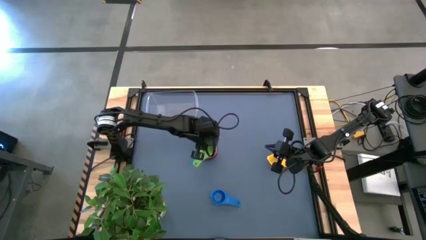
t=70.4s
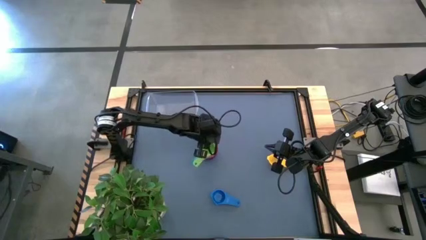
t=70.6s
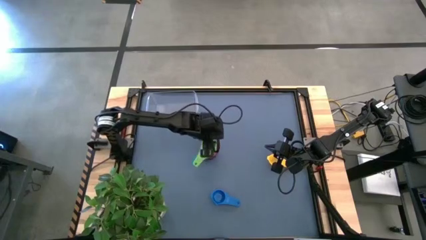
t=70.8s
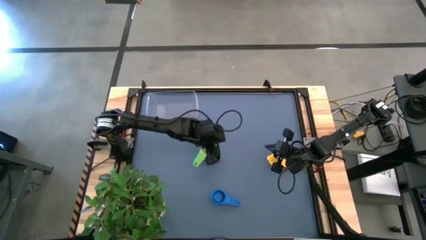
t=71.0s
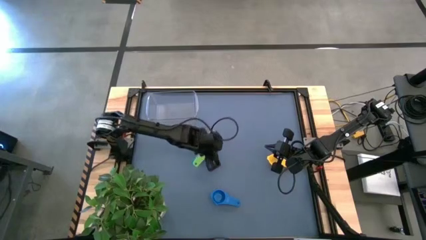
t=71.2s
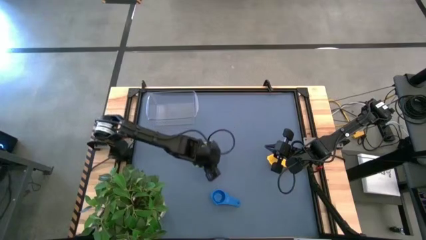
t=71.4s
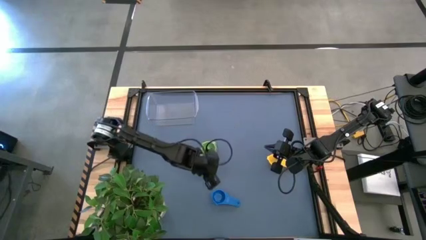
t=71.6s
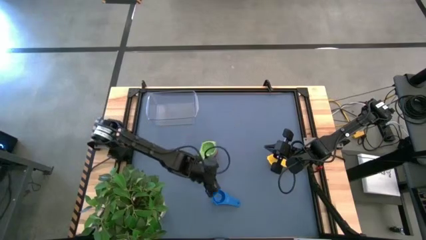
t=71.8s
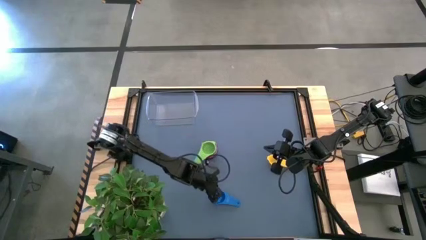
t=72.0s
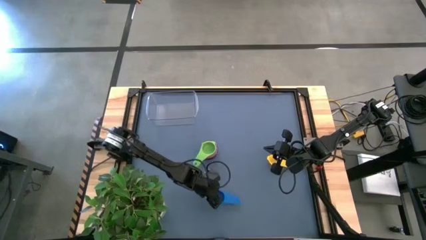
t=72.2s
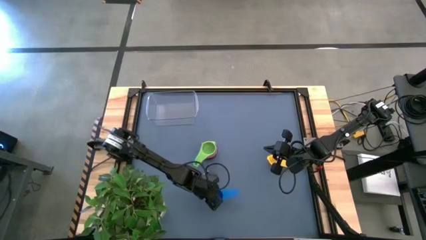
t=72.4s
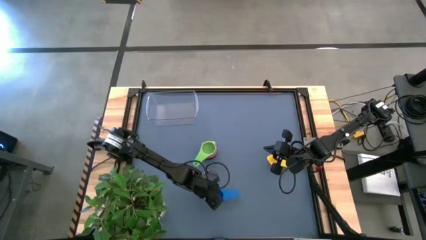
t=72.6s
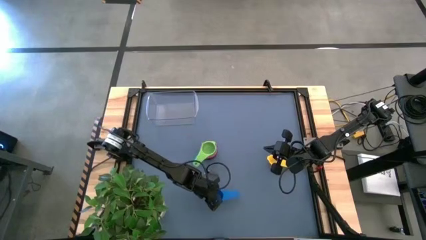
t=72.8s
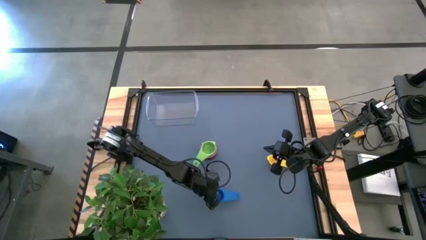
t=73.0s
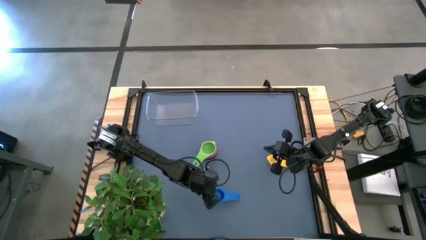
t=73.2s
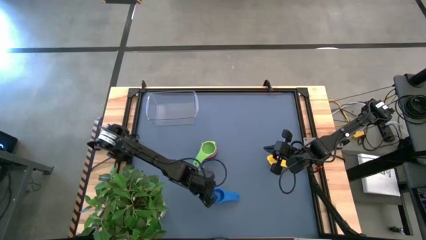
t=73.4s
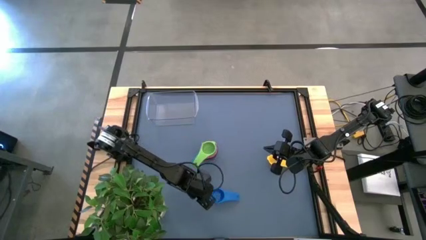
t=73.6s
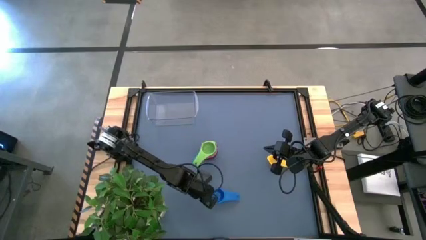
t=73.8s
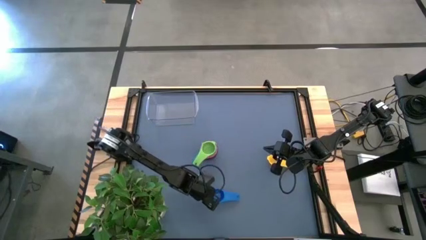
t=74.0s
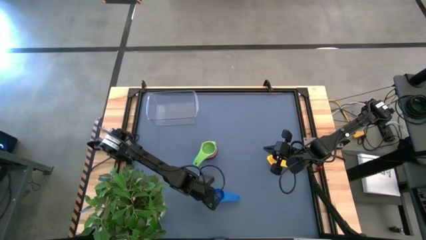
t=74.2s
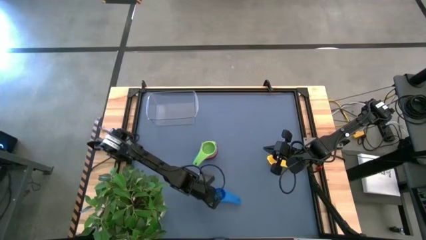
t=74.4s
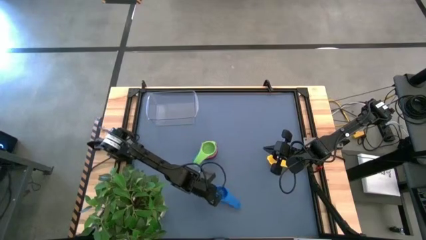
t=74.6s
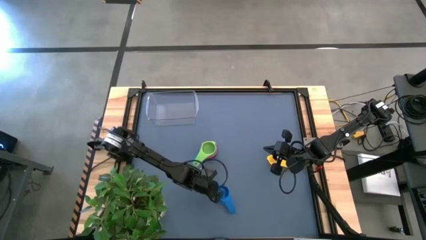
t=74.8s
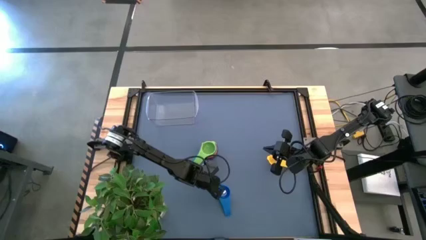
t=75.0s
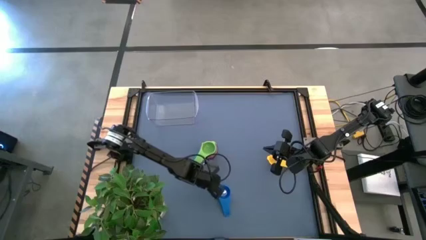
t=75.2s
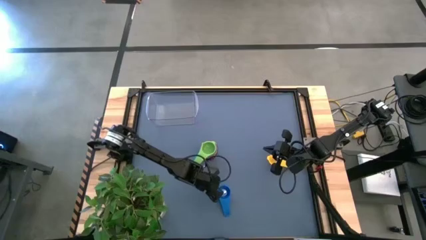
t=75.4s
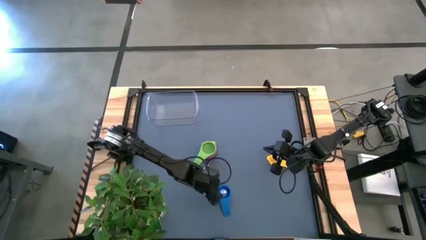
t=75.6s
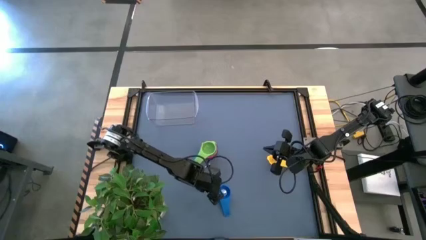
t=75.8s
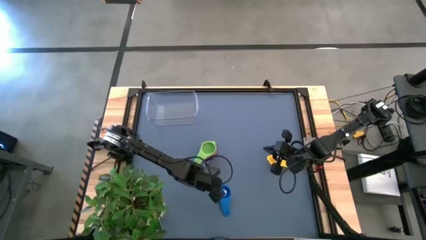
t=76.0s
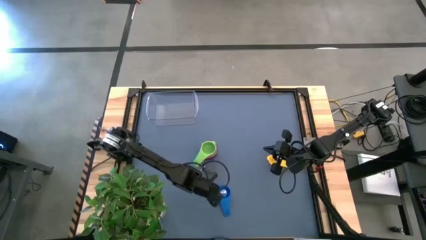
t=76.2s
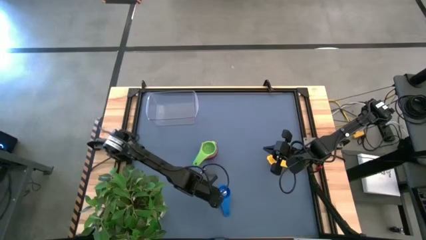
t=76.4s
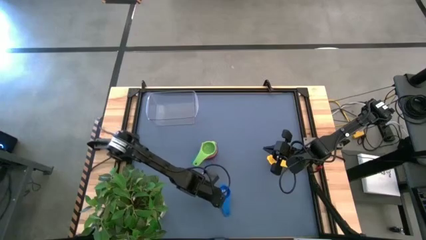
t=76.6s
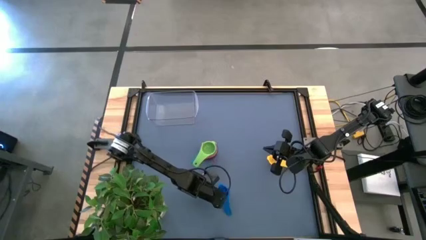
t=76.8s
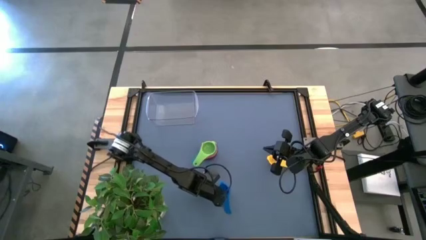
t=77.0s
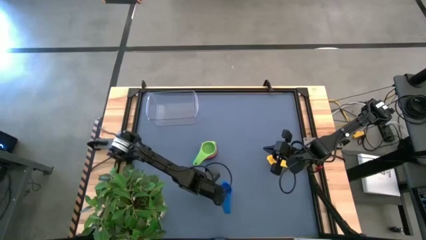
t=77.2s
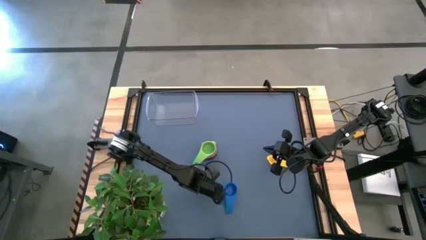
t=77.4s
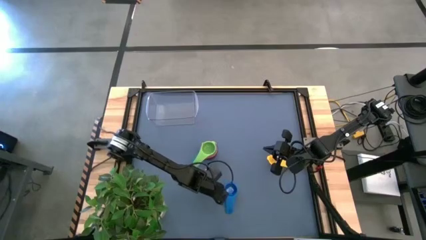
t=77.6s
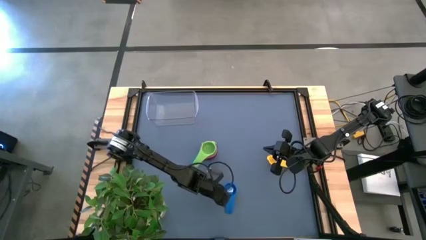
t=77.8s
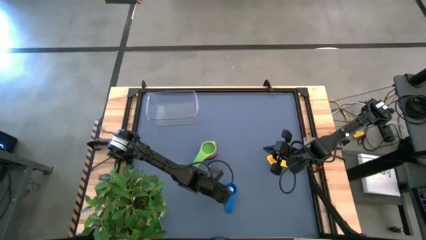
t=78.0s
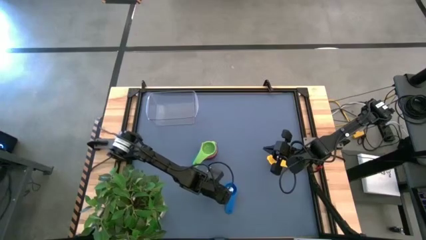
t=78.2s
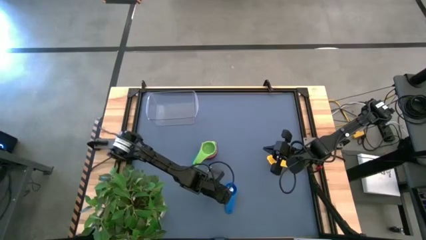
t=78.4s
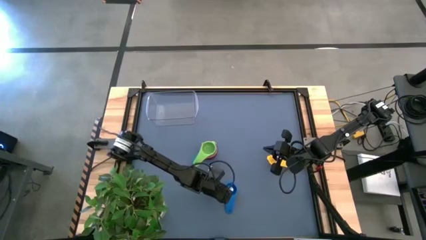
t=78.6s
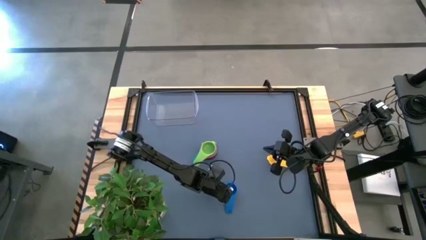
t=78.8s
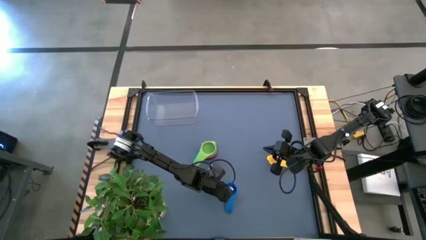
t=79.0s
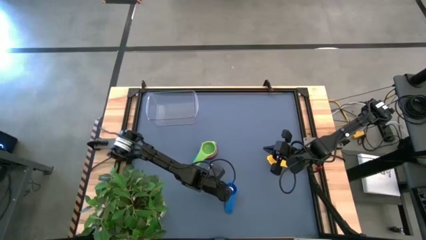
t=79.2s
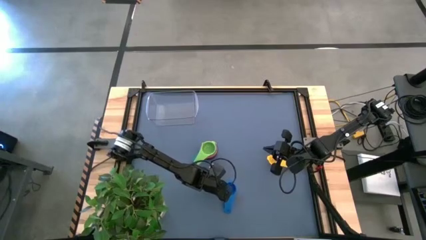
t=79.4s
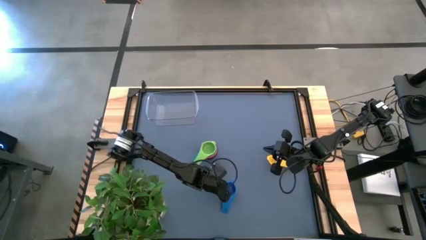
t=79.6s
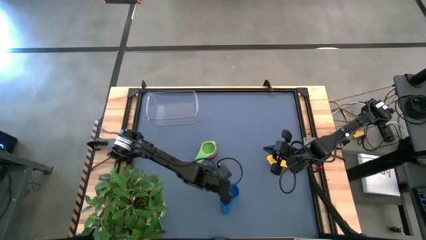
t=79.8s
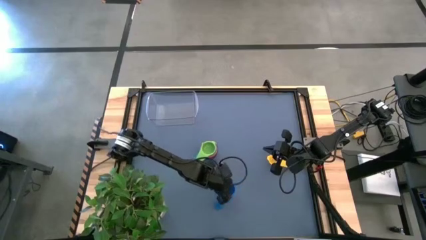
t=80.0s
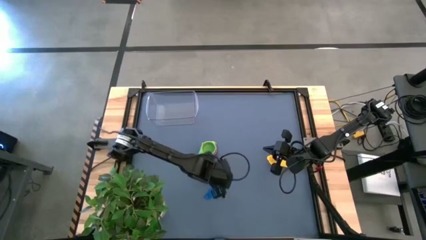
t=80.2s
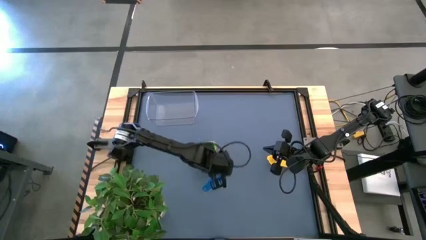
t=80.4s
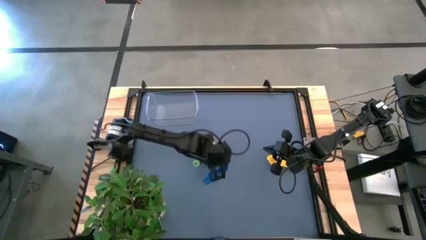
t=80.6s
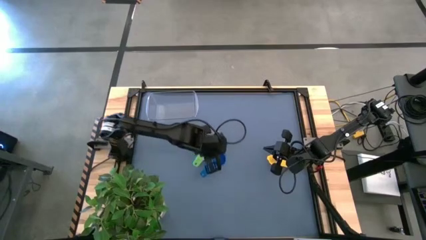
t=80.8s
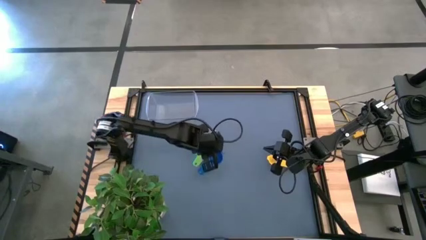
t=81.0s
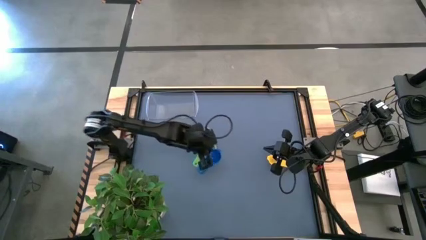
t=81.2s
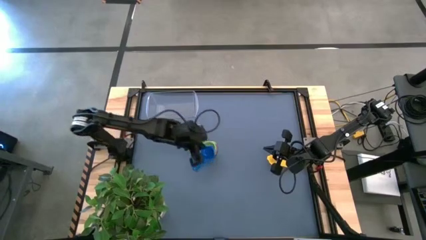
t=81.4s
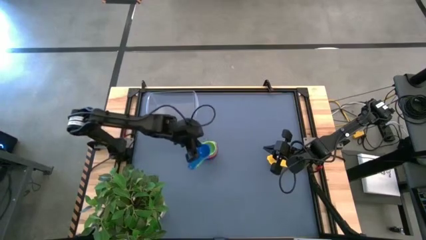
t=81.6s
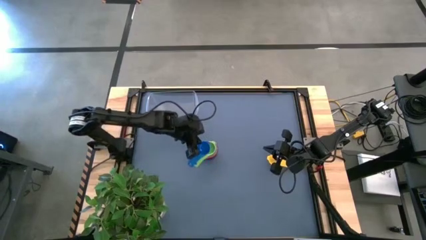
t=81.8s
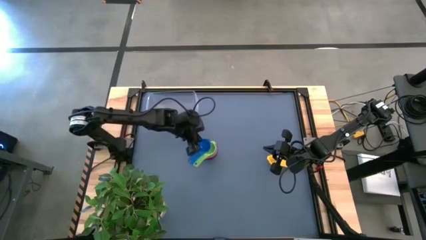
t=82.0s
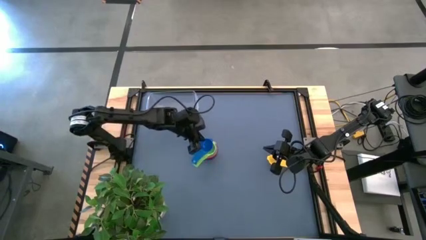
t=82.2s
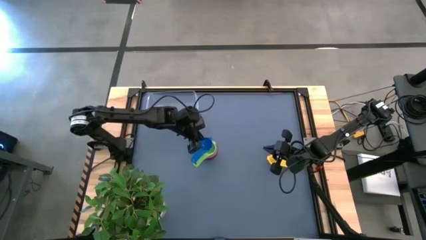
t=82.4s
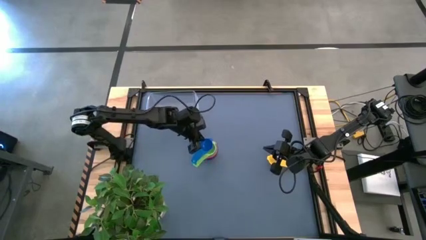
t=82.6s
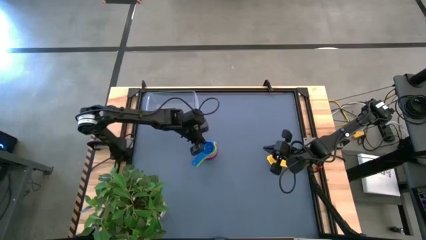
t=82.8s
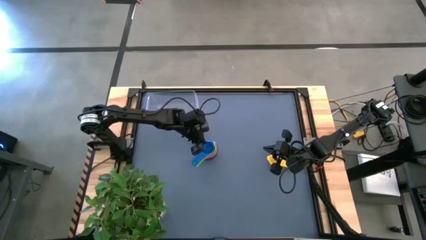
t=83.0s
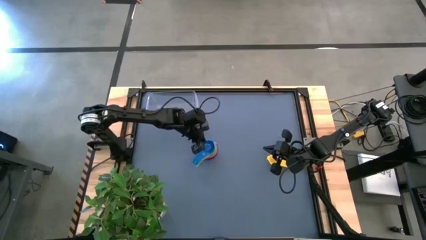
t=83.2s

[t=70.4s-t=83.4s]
Task: Nest measuring cups in basket
Stack the blue measuring cup on top of the green measuring cup
